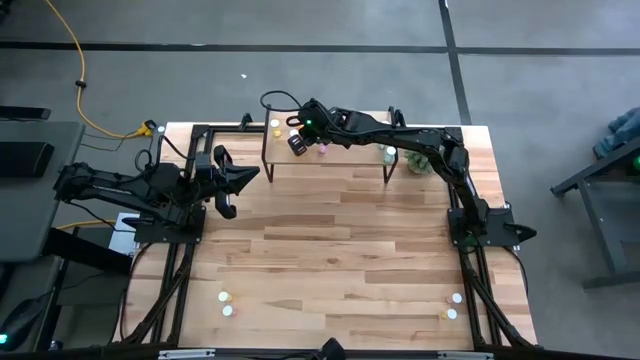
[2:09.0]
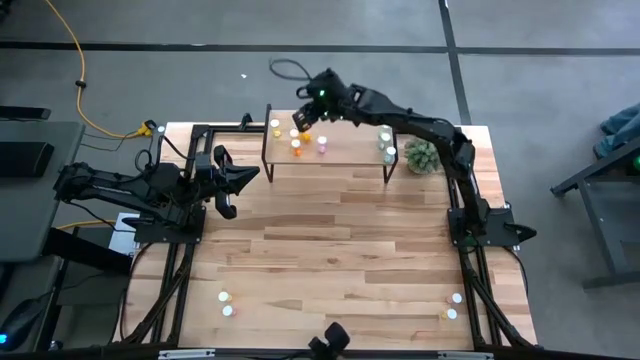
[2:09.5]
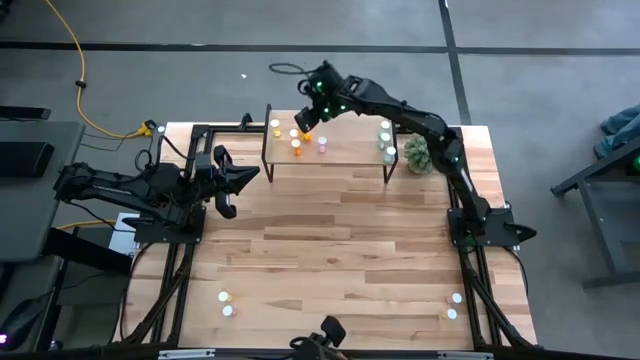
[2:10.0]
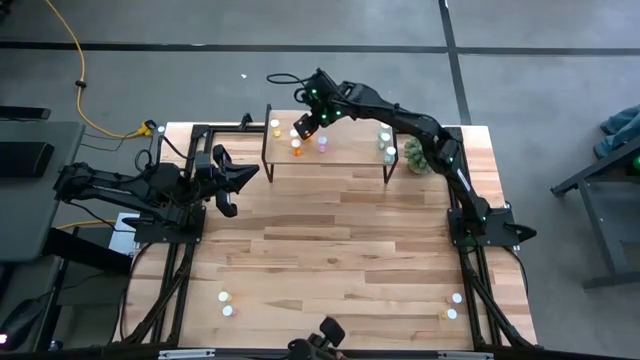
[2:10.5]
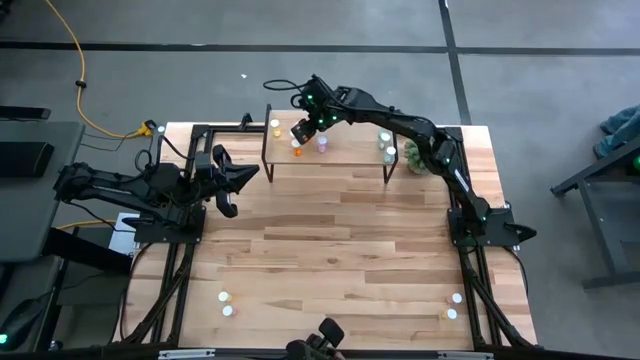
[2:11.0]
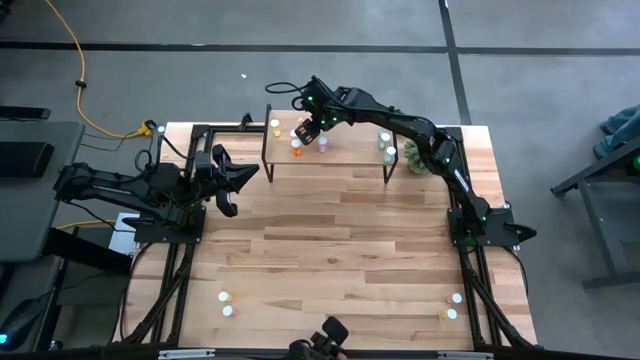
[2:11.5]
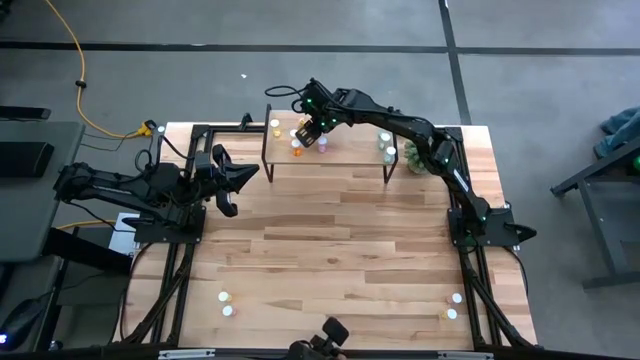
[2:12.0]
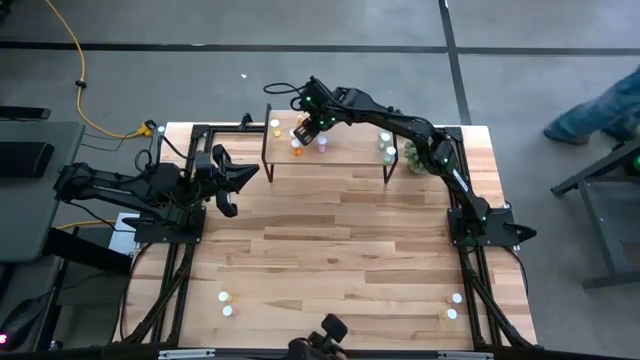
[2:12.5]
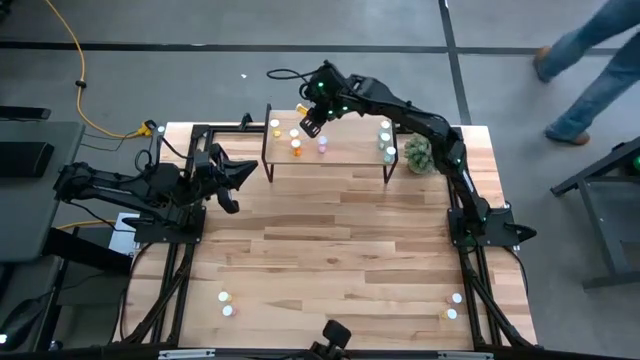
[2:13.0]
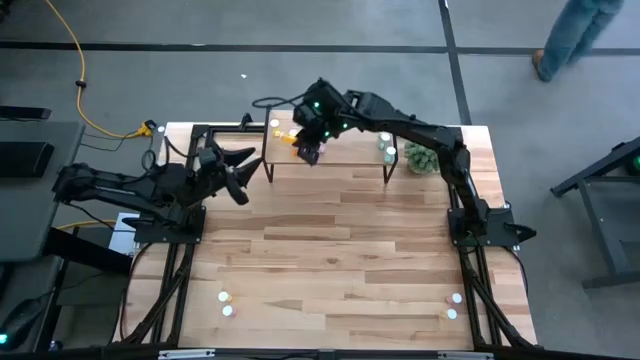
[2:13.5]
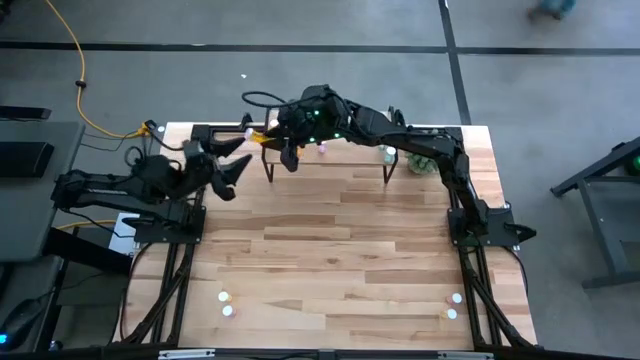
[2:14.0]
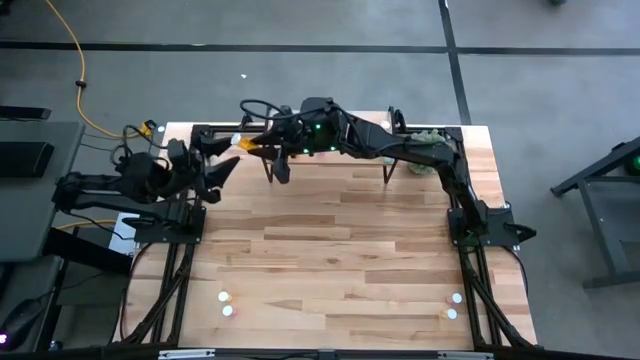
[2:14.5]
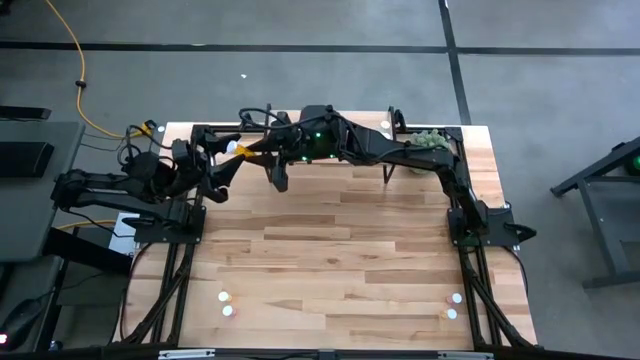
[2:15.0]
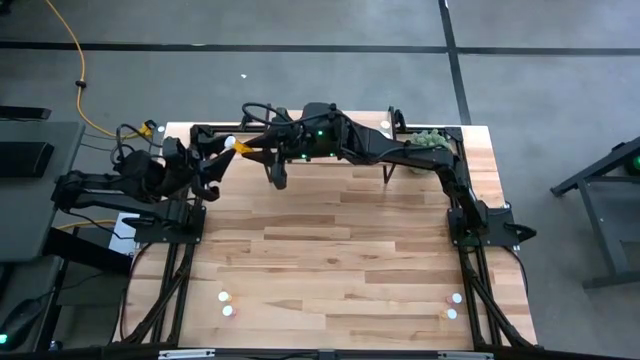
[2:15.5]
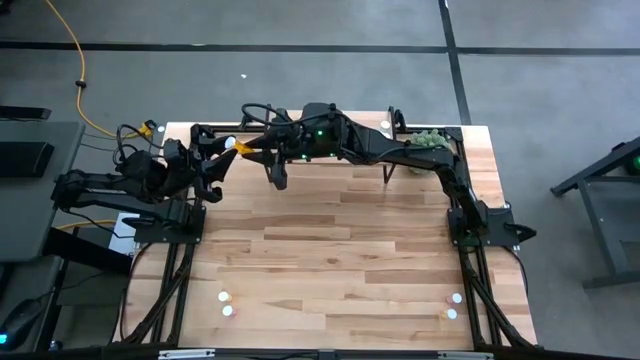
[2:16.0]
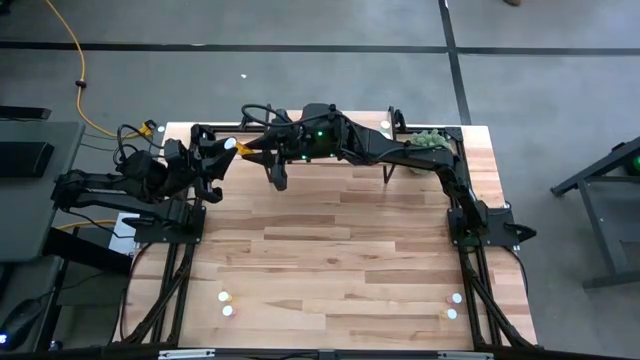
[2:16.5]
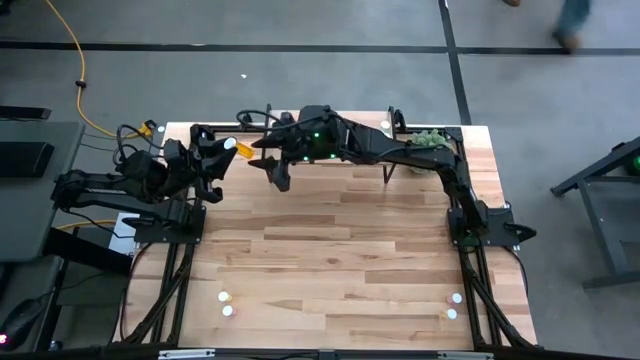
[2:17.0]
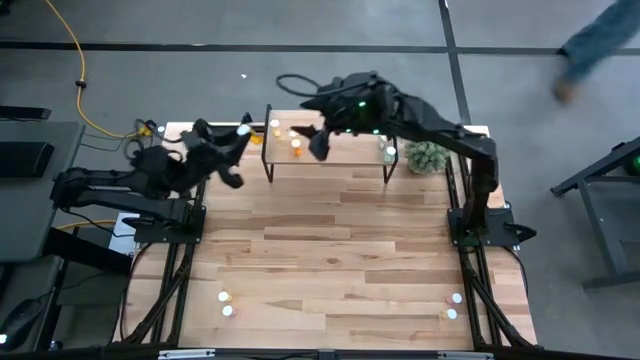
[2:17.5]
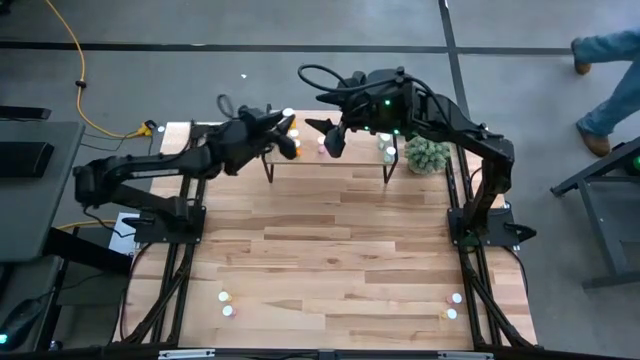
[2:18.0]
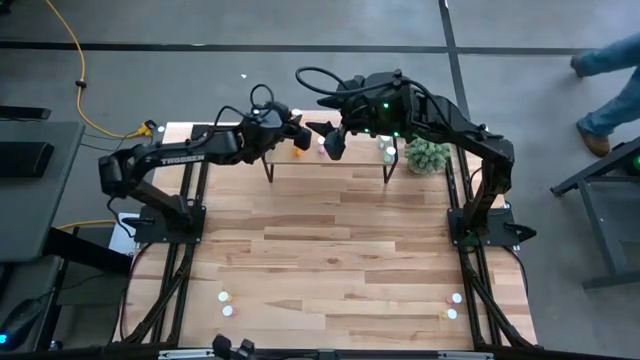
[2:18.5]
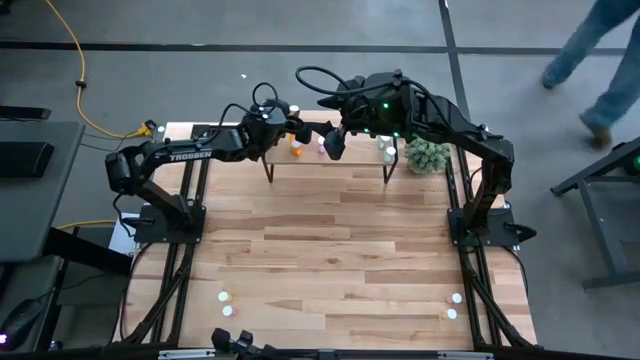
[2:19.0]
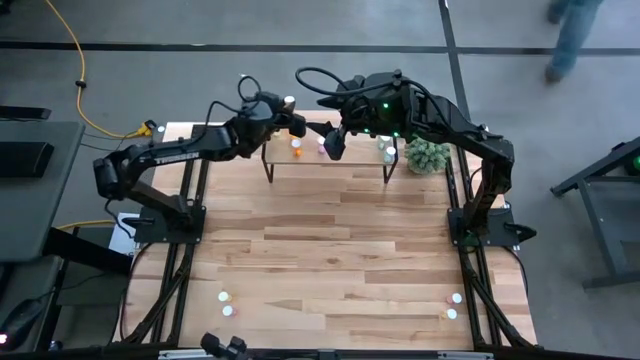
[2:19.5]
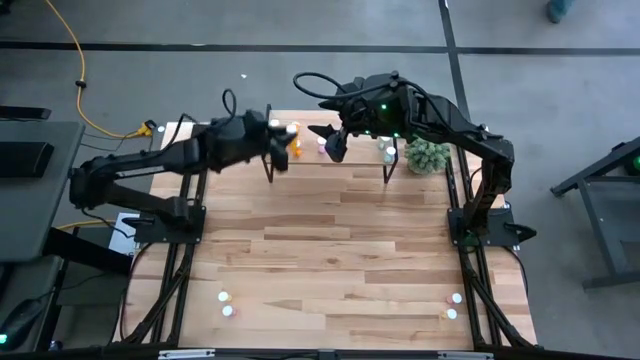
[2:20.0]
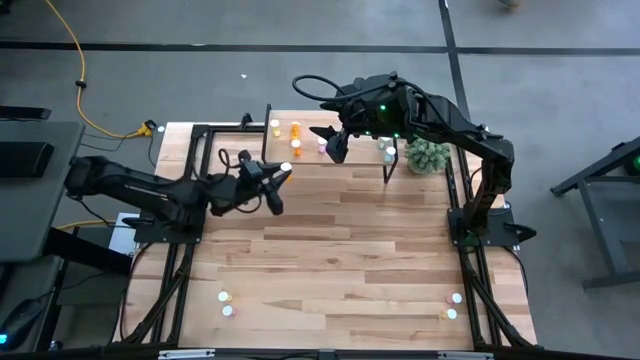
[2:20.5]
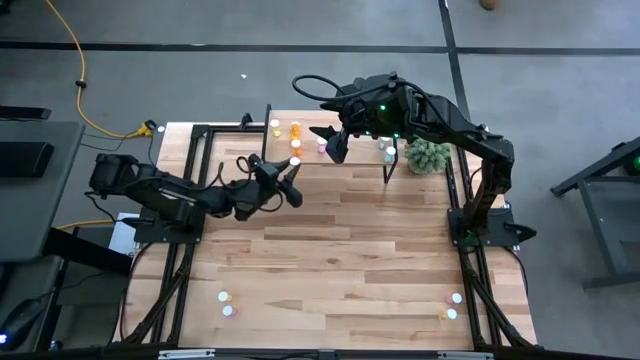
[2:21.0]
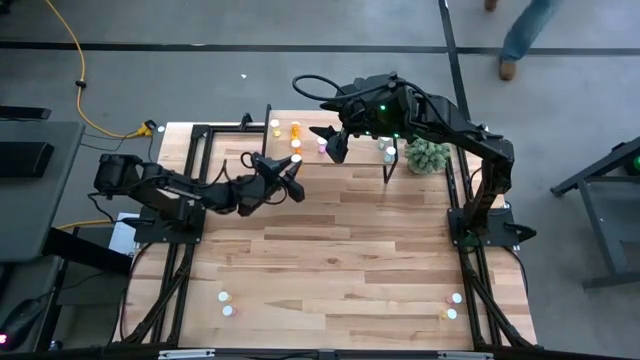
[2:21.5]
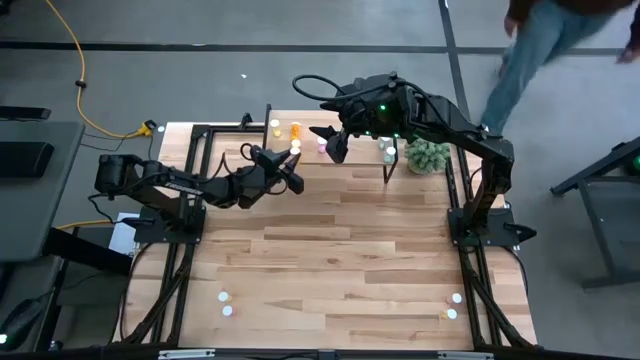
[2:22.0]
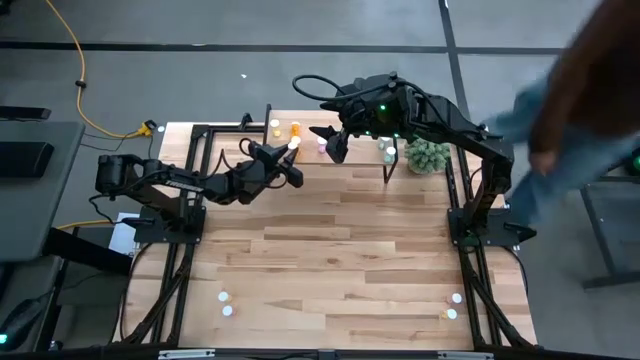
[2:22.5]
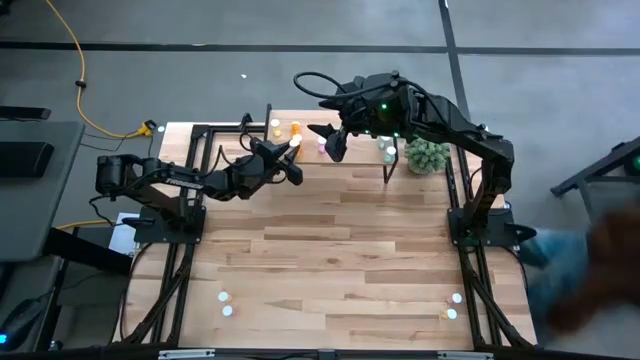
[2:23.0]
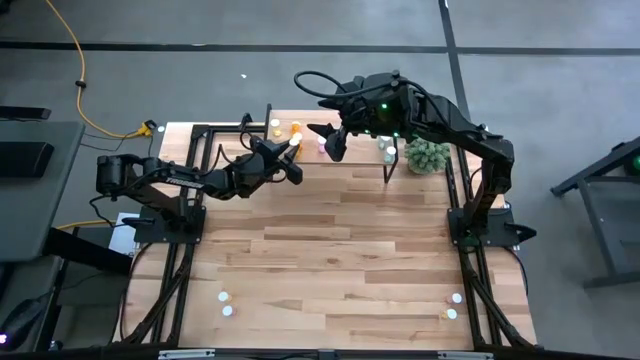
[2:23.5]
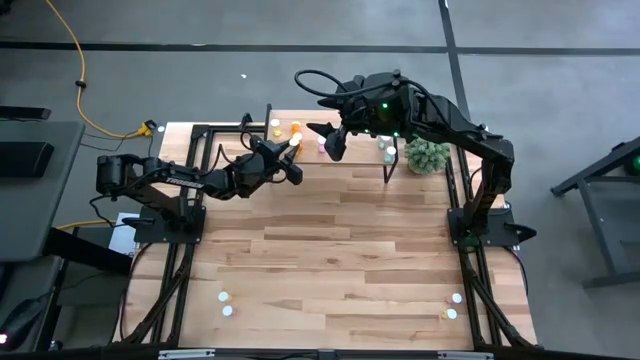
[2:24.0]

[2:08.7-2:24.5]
Task: Pick and place medicine bottles onto shelf by color
Put the orange pill bottle aligned with the other orange pill bottle on the shelf

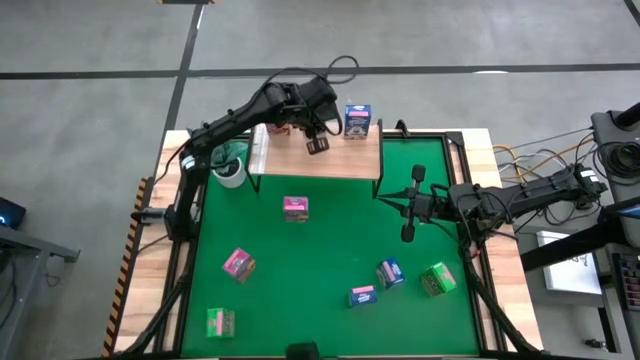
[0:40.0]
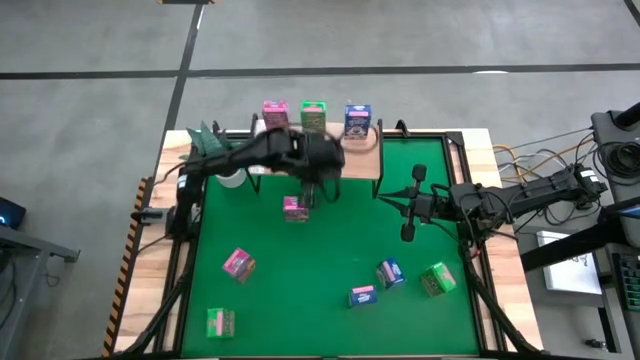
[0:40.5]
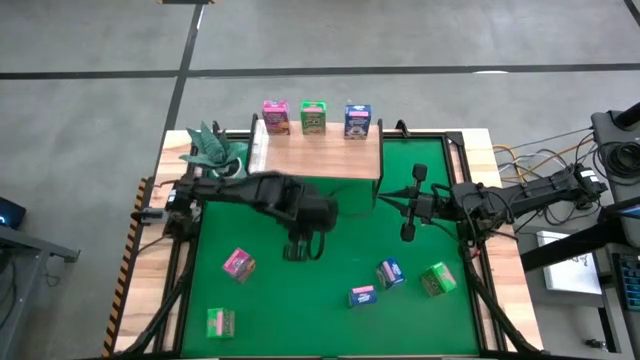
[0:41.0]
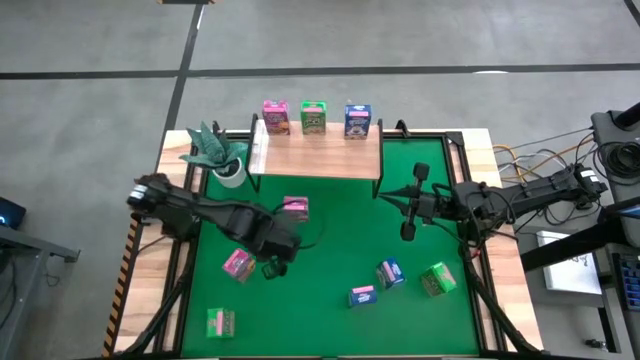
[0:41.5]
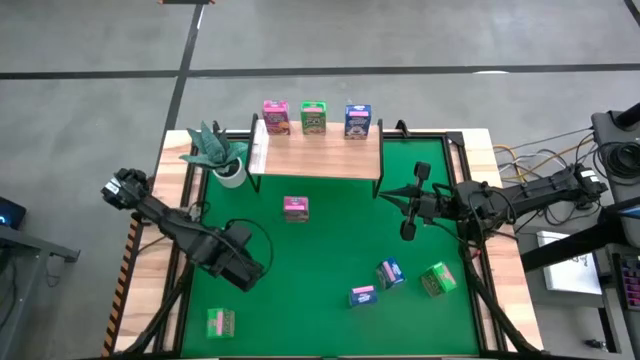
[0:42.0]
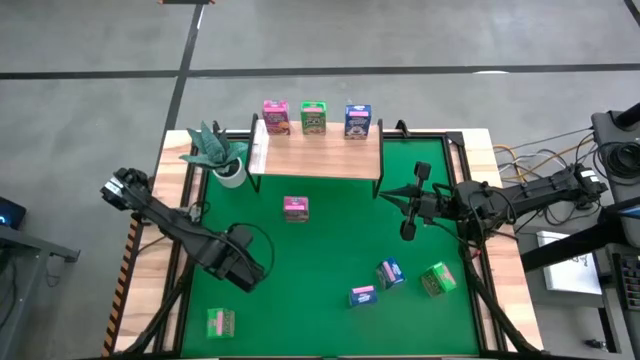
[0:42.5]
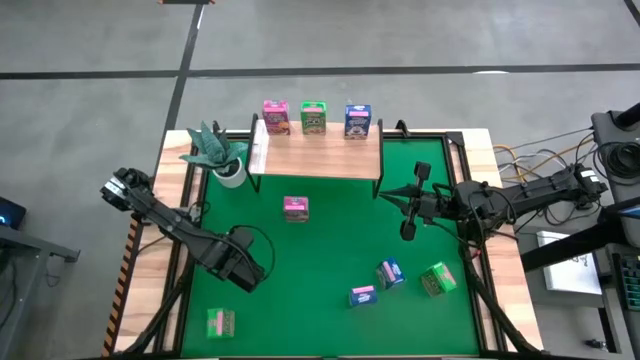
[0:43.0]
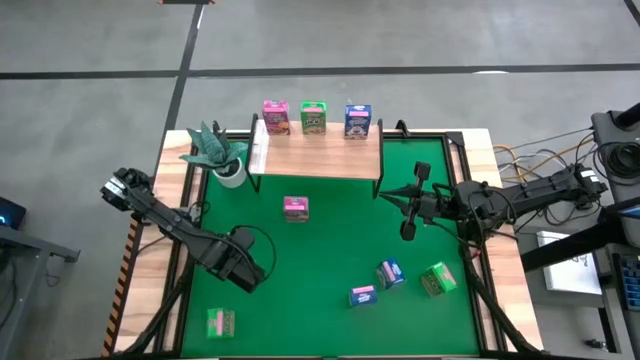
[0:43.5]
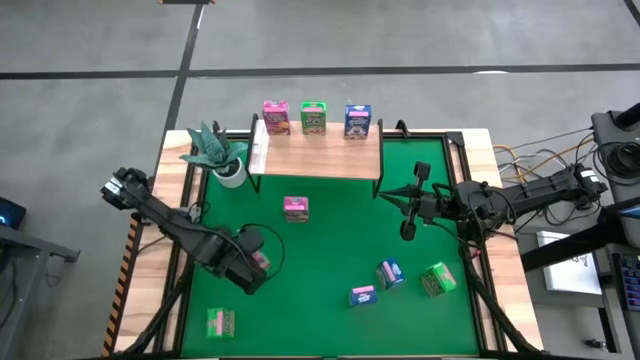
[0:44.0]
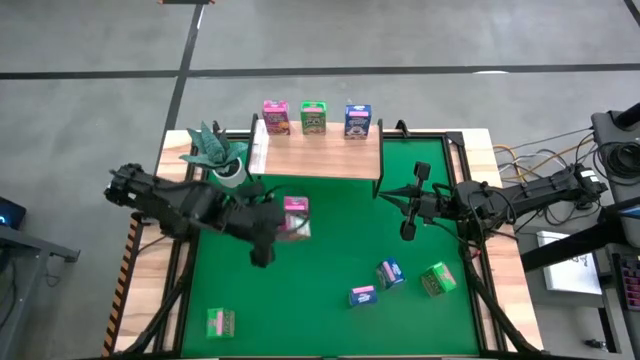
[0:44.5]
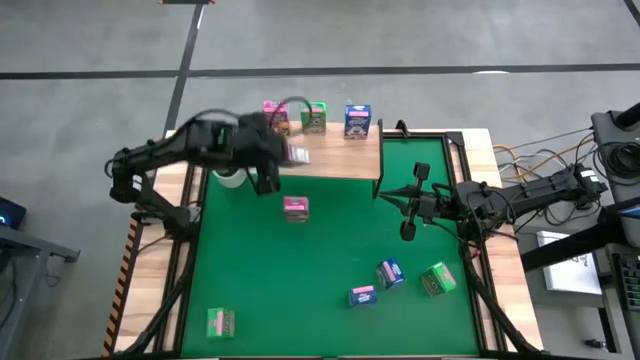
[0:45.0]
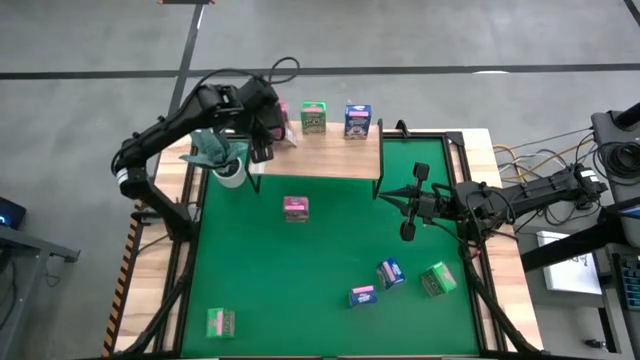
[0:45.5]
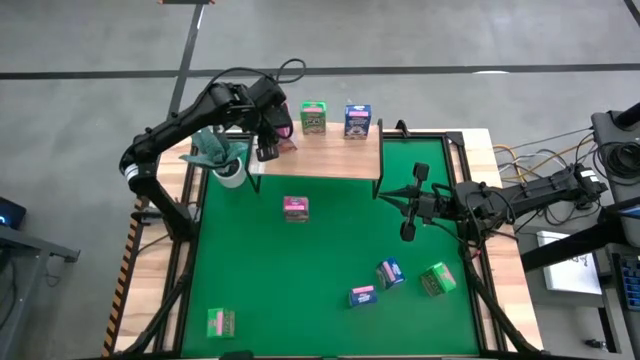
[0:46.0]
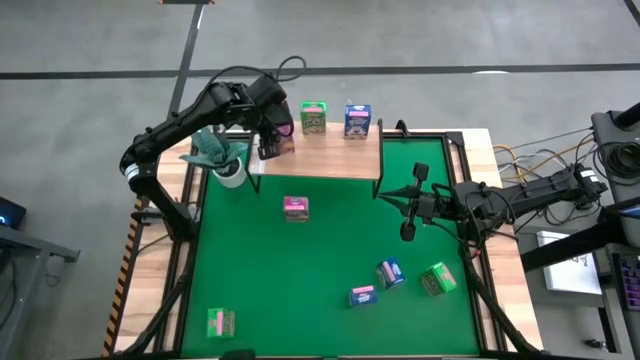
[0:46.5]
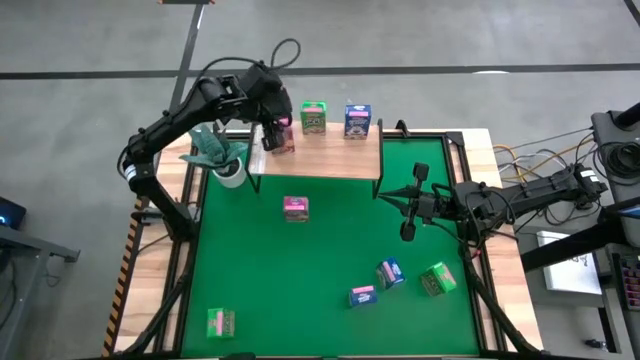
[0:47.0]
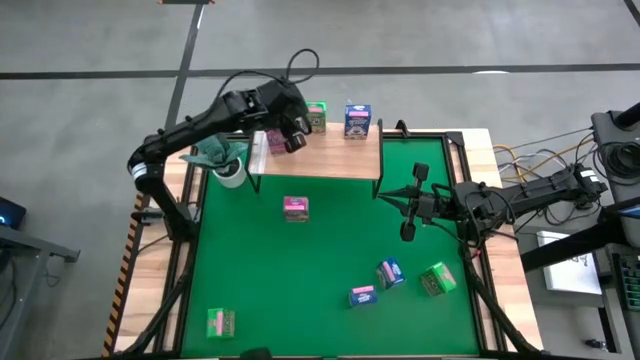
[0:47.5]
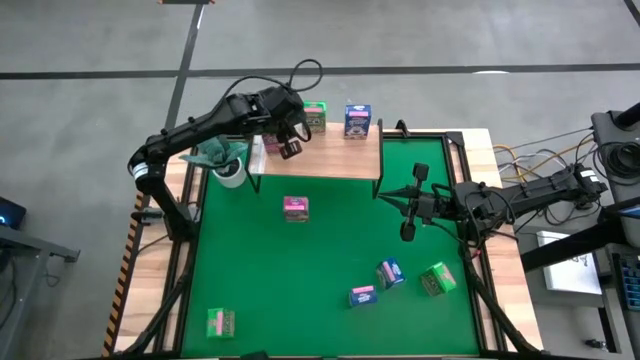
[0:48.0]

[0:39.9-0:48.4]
Task: Stack cereal on shelf
Put the bottom pink cereal box on the shelf aligned with the other pink cereal box
